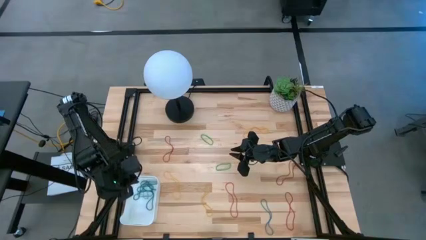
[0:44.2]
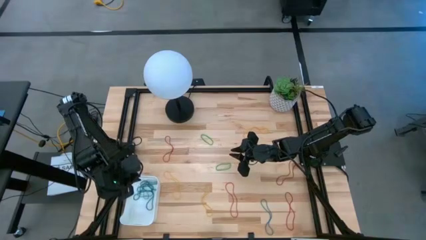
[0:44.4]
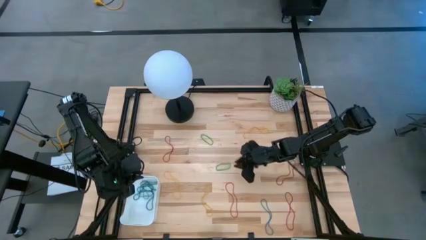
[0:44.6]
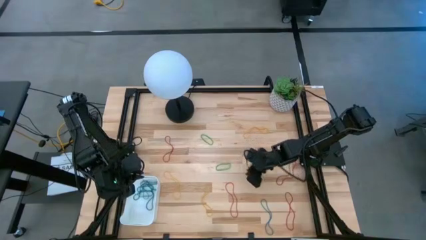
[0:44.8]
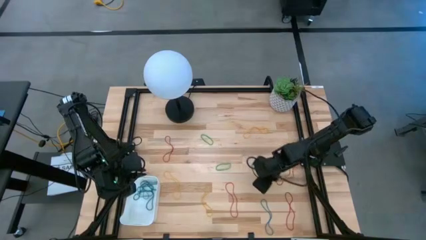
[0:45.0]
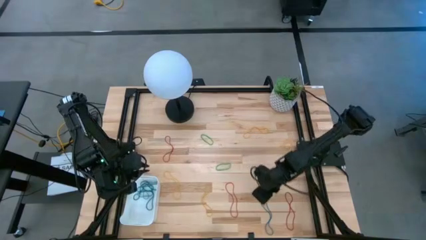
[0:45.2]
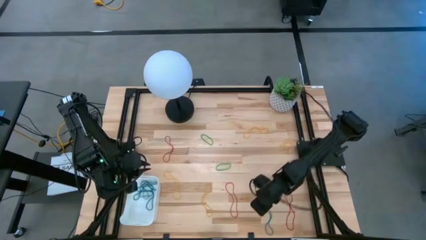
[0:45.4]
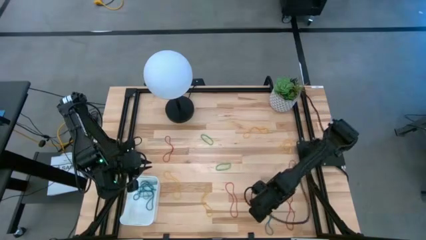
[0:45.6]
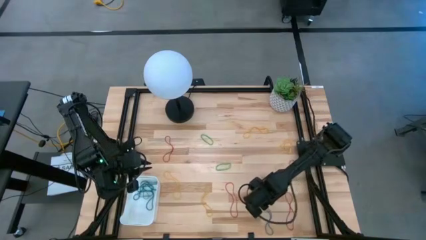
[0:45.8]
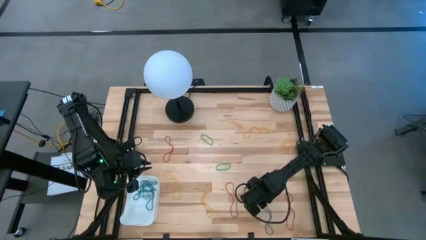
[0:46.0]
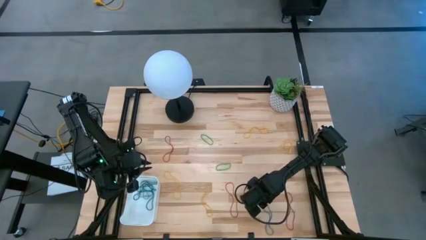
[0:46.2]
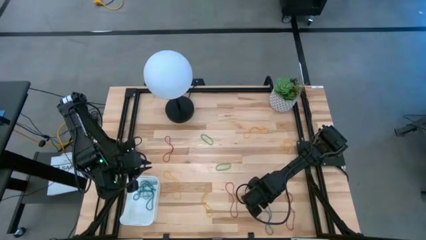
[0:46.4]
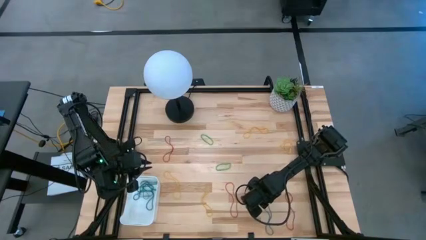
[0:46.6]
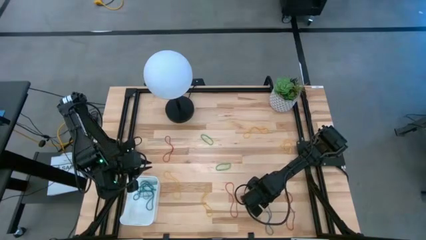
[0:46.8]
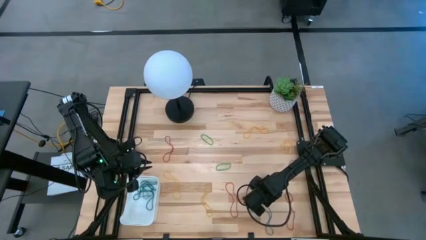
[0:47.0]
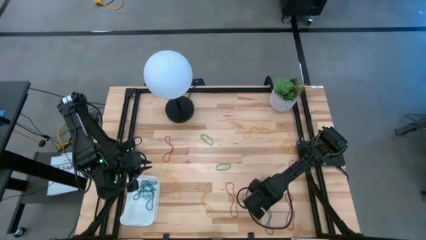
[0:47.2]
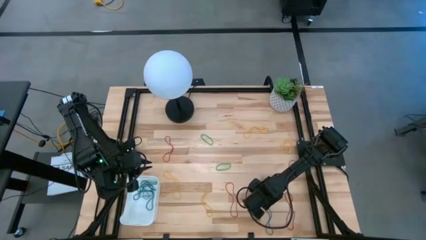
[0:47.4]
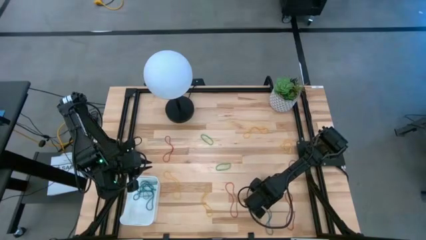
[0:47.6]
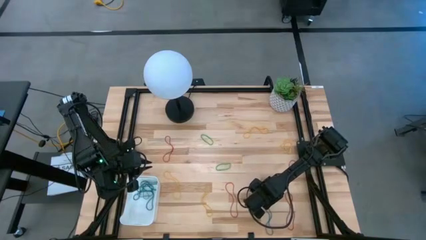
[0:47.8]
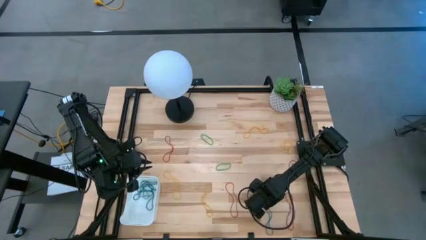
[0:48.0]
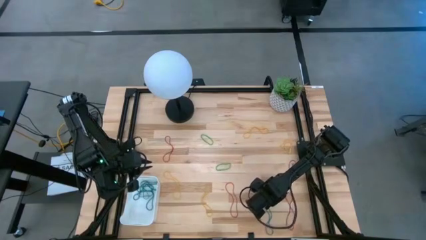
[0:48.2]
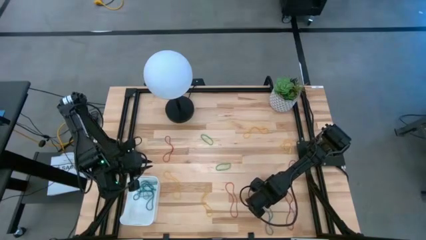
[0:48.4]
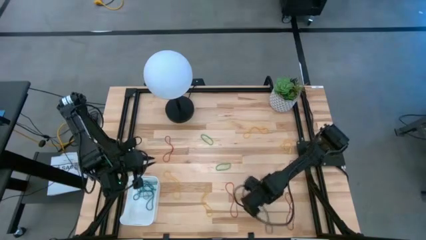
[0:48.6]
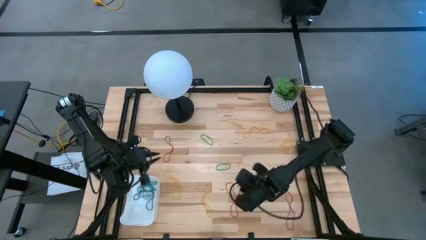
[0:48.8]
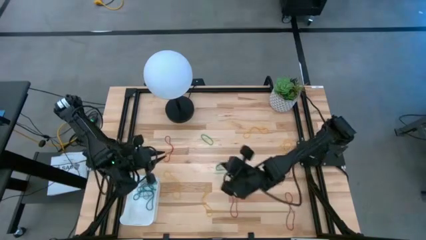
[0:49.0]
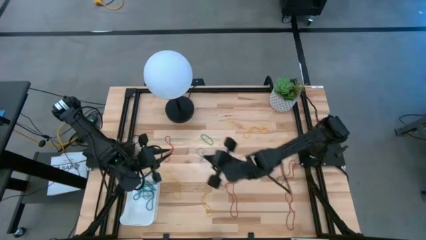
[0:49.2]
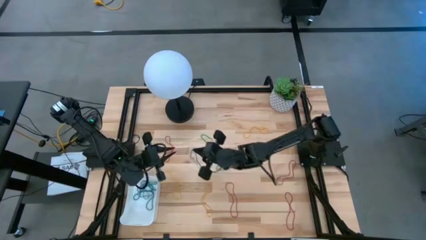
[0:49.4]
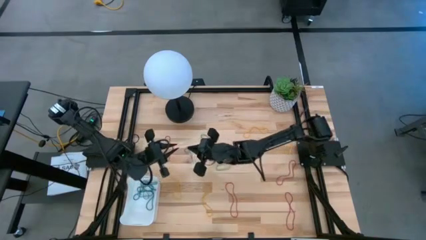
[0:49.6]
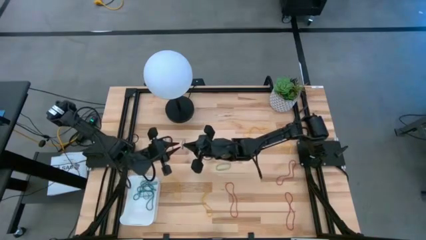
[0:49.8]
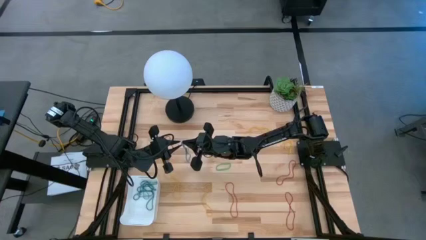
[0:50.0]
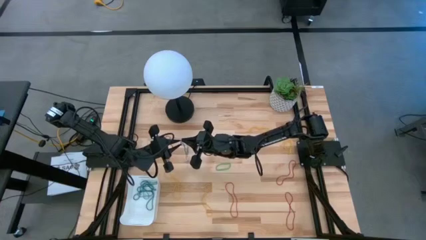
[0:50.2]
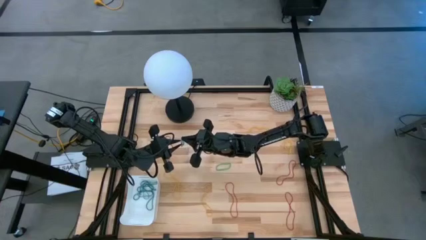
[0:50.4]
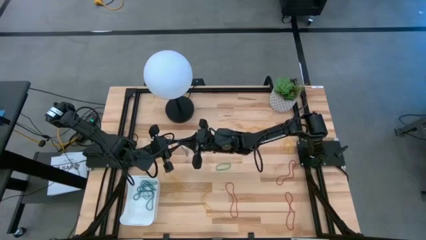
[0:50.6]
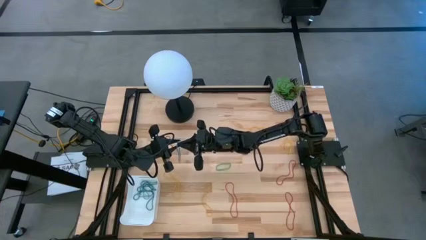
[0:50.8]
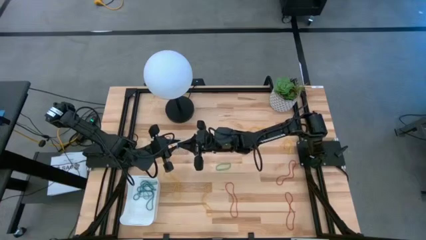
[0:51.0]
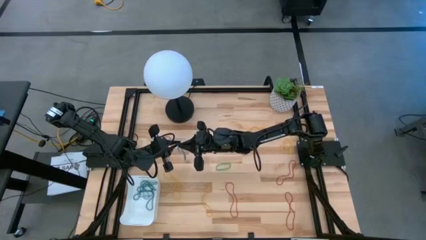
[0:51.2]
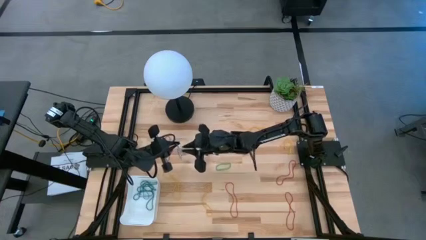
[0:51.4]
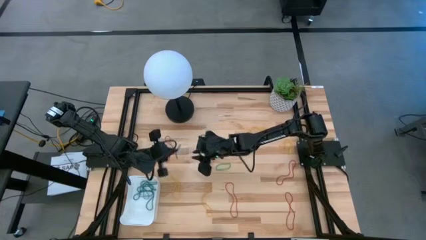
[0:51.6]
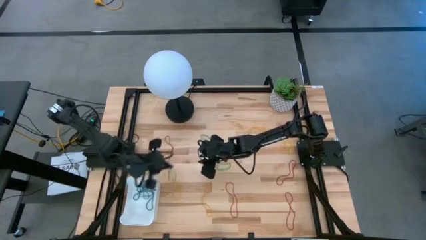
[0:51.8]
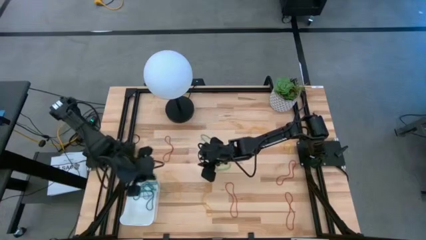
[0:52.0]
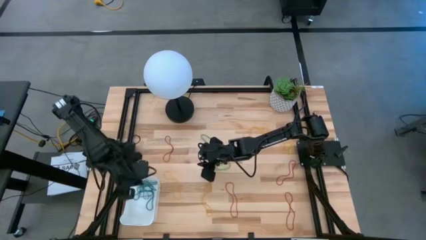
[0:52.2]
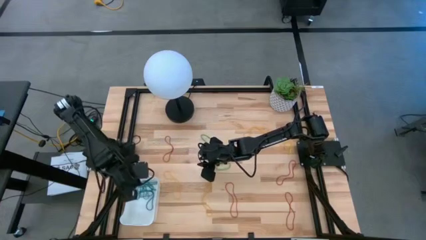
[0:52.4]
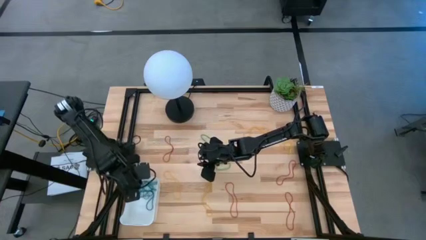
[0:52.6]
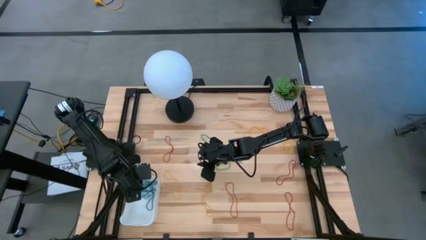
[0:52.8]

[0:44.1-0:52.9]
Task: Pick and place items into bin
Put the blue rubber band into the white bin

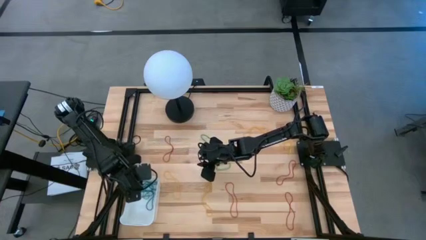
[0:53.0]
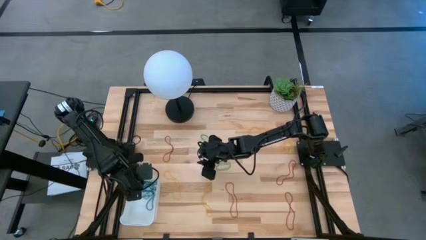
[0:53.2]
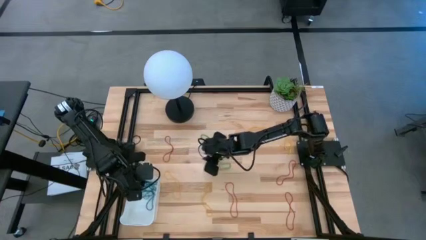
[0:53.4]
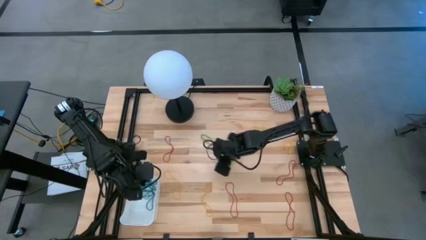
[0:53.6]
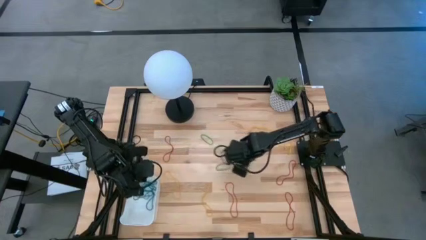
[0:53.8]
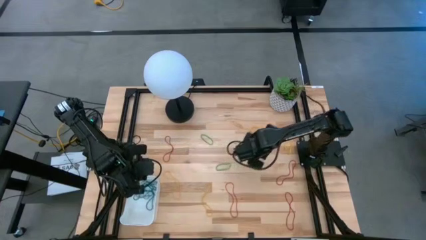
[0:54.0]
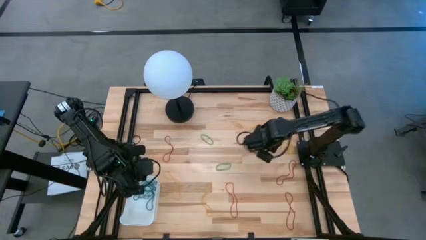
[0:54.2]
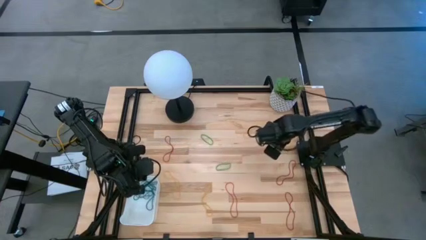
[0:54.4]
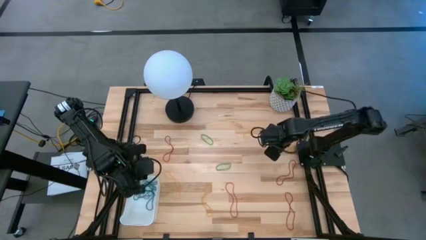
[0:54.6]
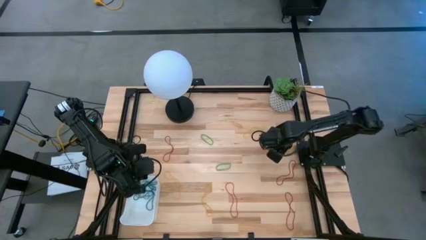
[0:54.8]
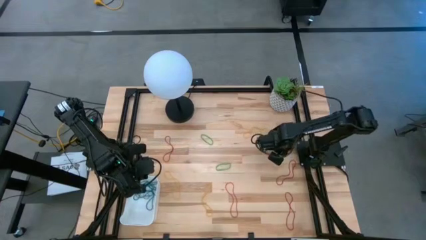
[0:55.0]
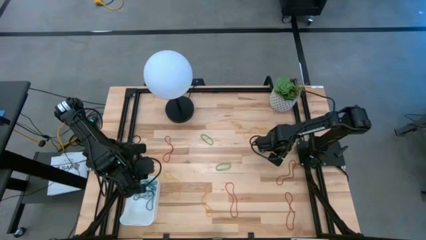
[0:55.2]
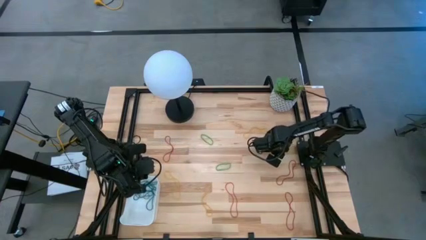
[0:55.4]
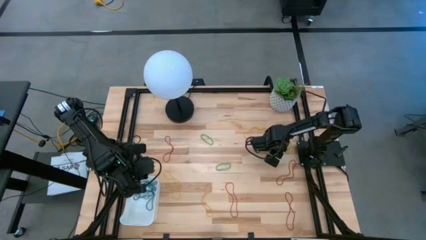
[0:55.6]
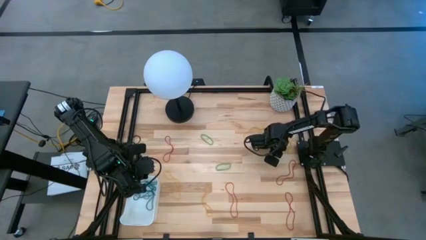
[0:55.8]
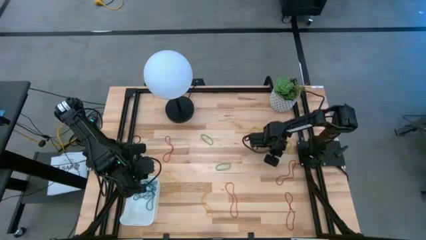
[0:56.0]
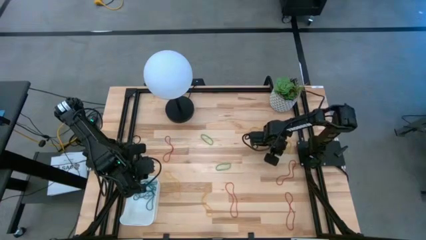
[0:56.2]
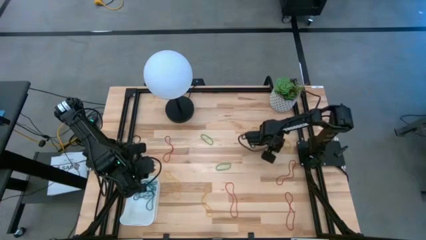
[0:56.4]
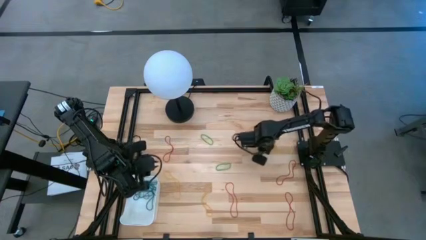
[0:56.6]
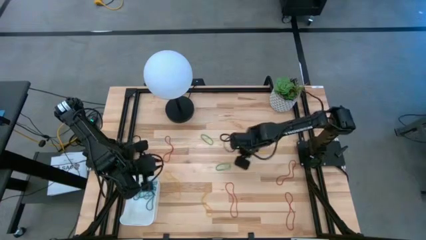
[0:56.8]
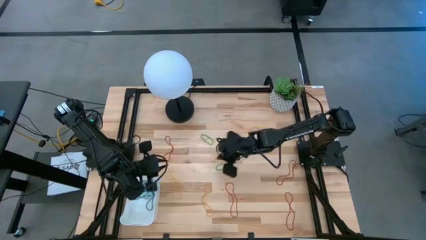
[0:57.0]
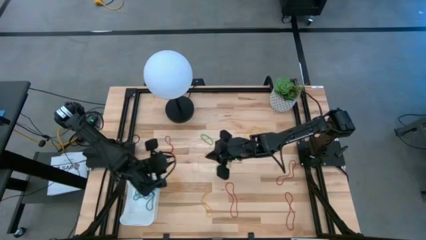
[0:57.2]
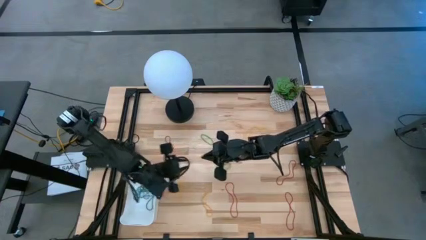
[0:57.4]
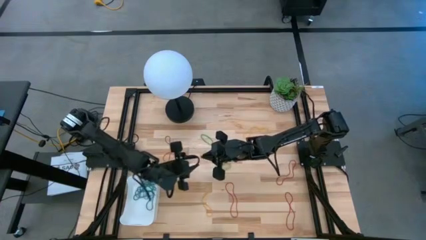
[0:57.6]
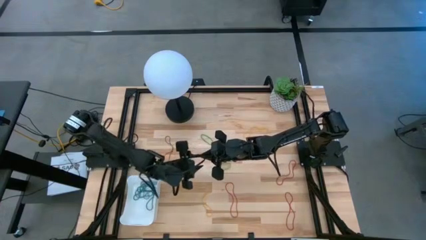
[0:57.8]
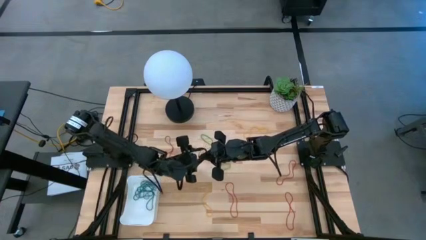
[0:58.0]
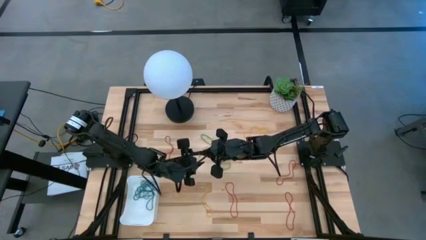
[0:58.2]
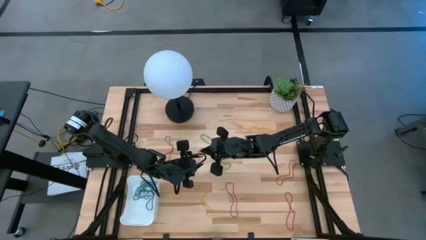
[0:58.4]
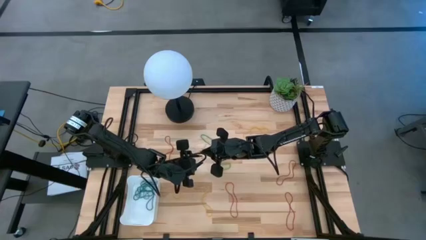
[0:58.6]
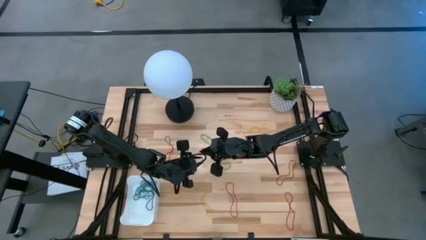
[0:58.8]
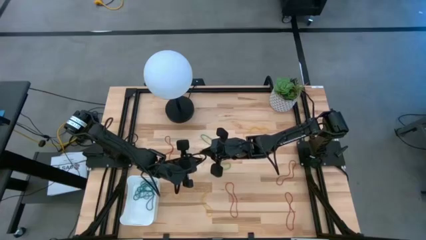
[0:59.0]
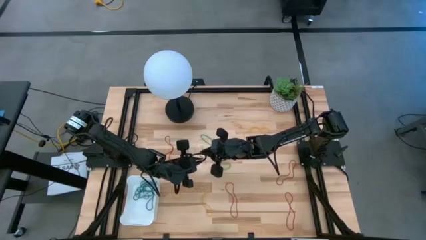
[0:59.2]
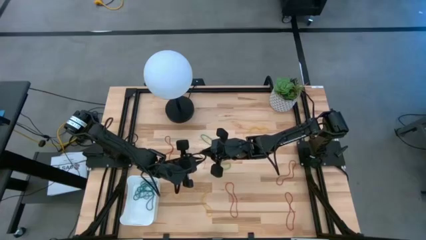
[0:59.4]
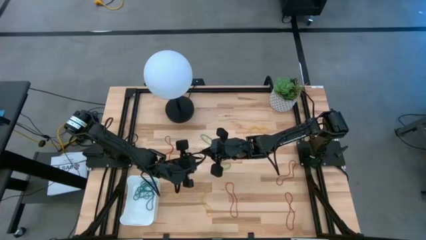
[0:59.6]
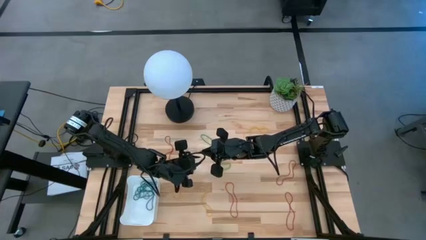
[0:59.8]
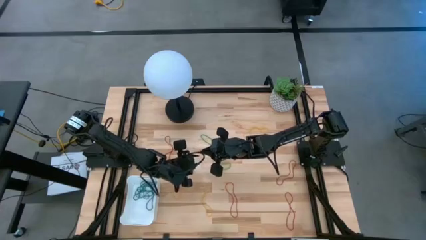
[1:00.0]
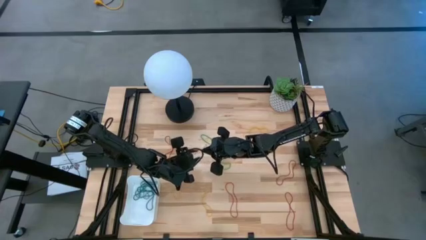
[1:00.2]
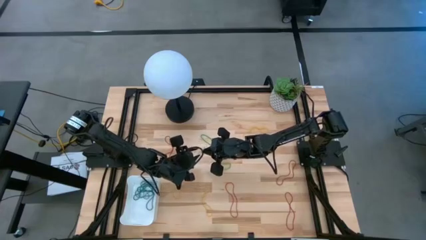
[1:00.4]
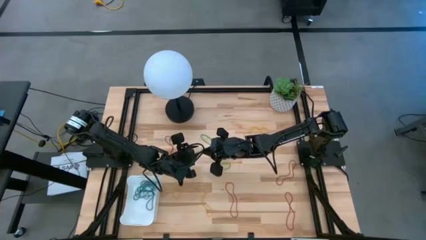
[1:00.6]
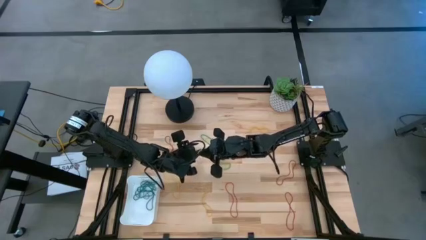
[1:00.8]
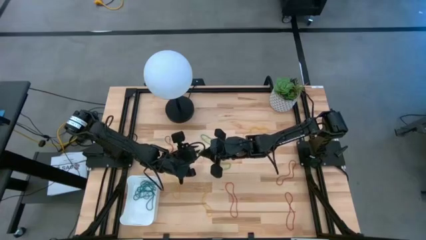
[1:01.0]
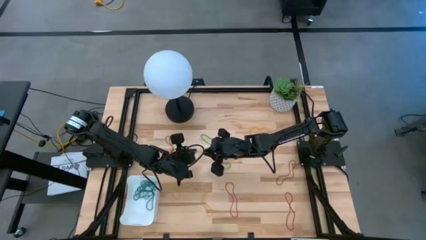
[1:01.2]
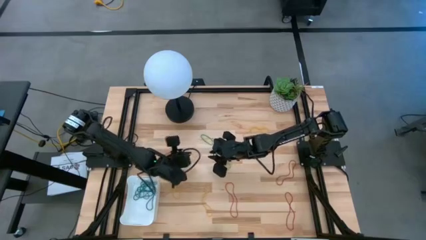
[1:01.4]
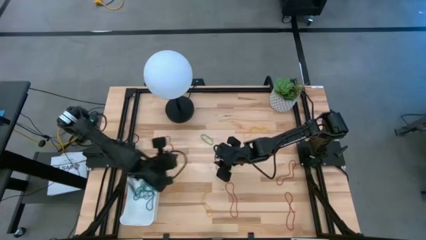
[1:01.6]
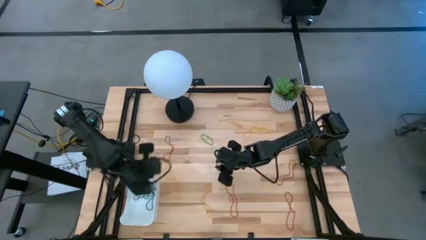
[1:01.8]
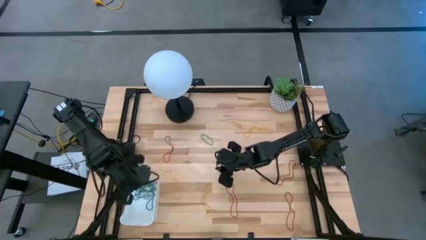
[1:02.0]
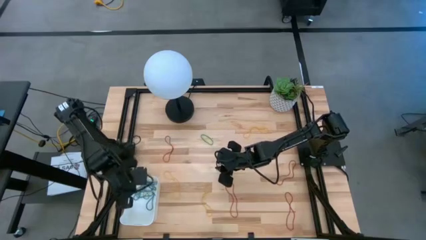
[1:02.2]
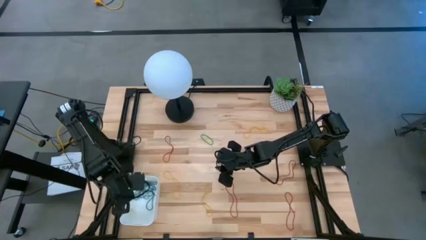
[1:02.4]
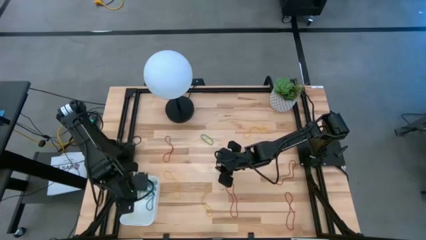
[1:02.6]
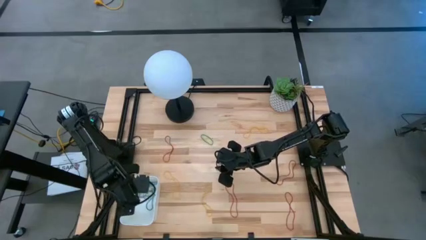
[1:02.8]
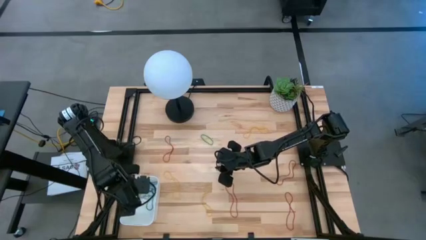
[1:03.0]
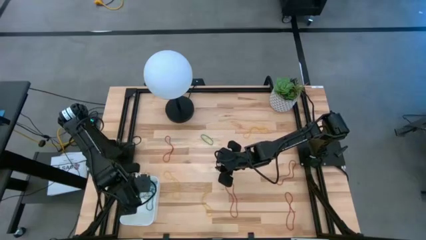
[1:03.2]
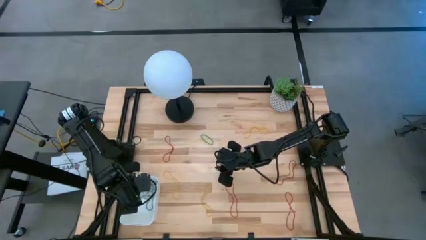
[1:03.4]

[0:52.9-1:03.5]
Put the yellow rubber band into the white bin
